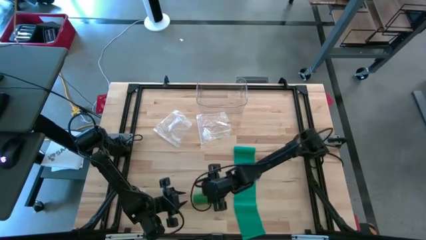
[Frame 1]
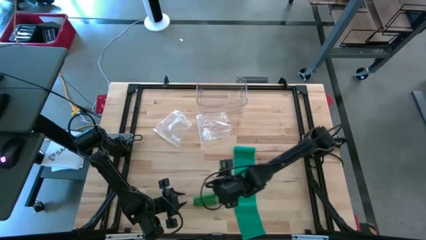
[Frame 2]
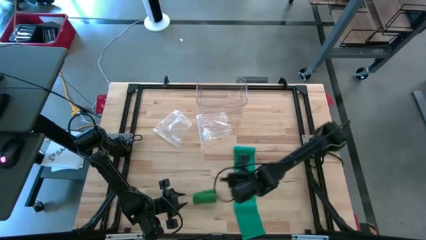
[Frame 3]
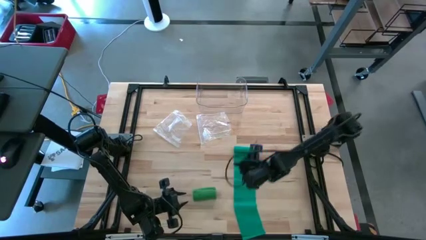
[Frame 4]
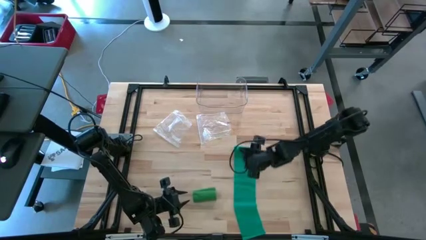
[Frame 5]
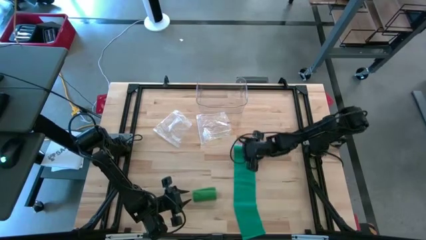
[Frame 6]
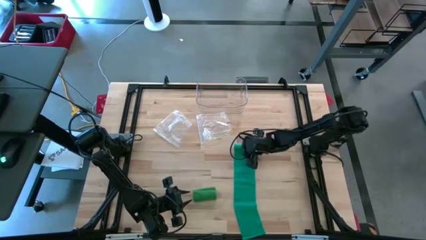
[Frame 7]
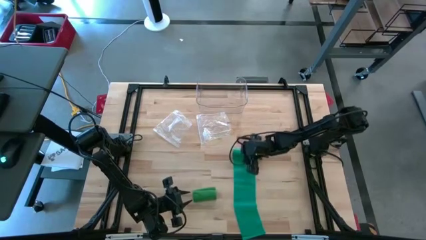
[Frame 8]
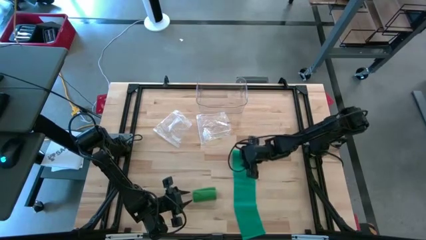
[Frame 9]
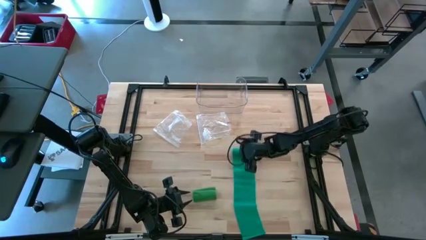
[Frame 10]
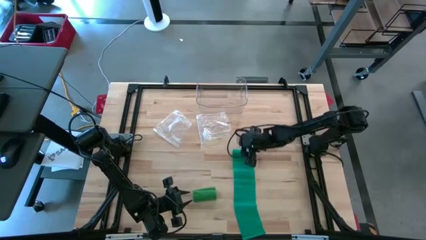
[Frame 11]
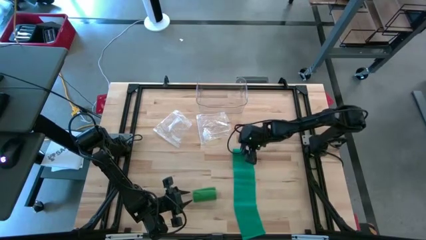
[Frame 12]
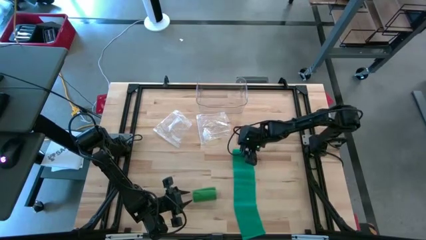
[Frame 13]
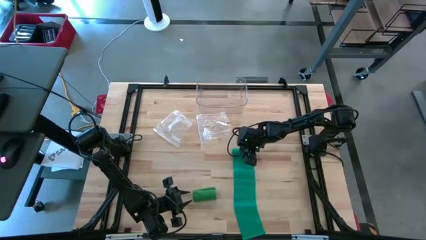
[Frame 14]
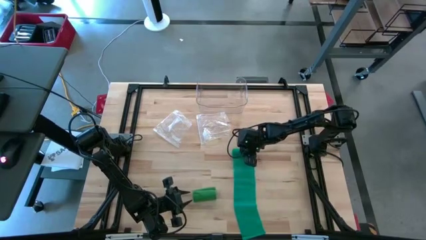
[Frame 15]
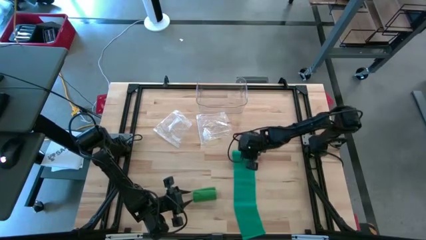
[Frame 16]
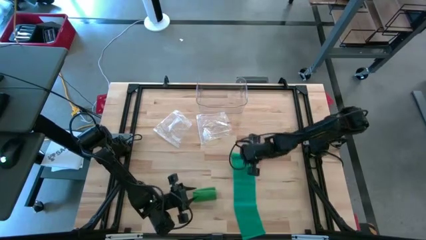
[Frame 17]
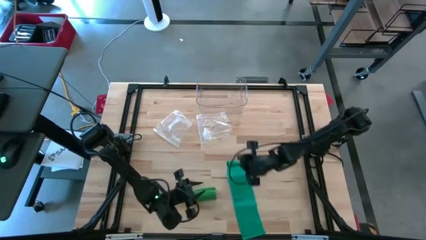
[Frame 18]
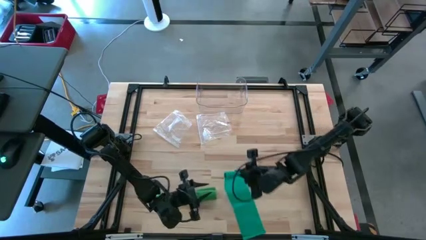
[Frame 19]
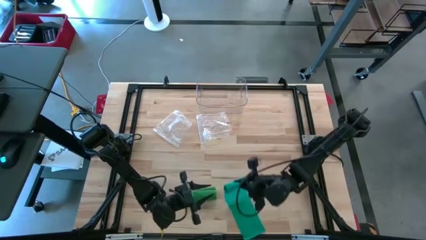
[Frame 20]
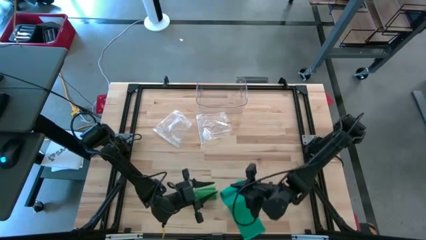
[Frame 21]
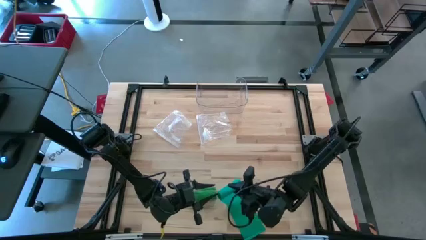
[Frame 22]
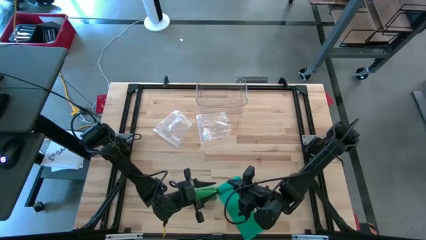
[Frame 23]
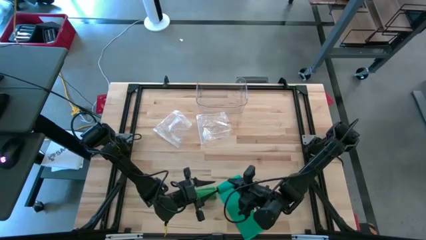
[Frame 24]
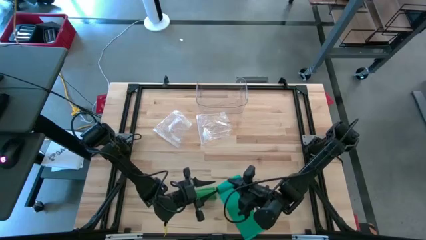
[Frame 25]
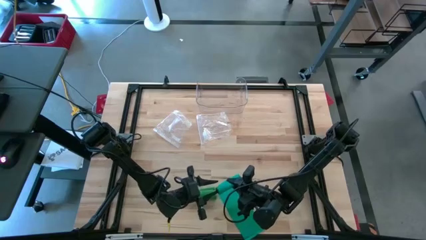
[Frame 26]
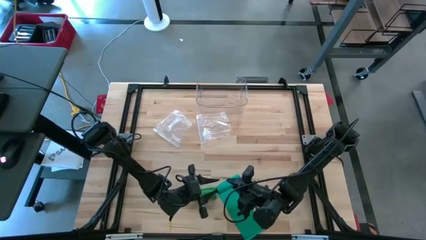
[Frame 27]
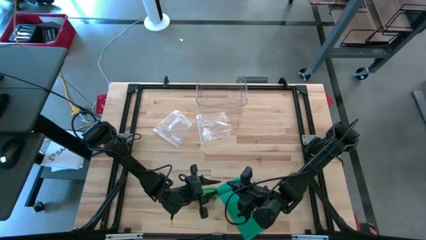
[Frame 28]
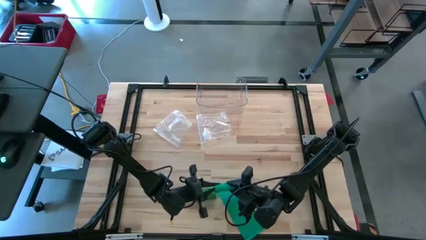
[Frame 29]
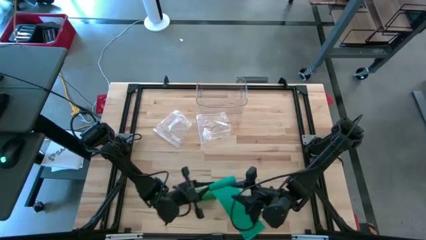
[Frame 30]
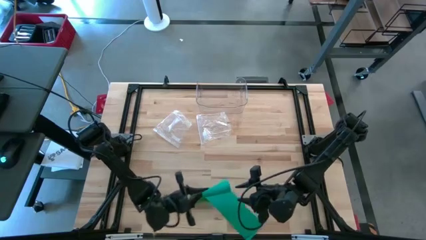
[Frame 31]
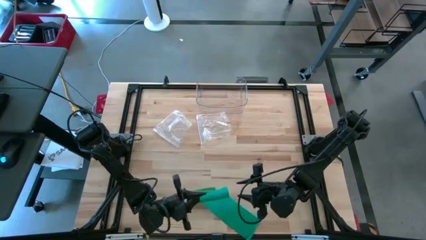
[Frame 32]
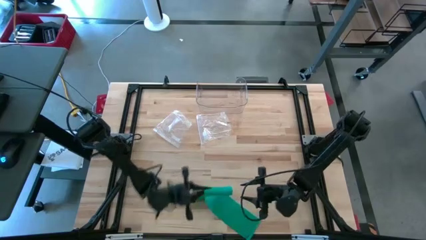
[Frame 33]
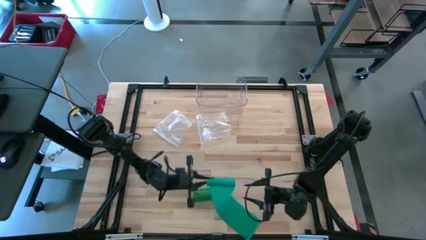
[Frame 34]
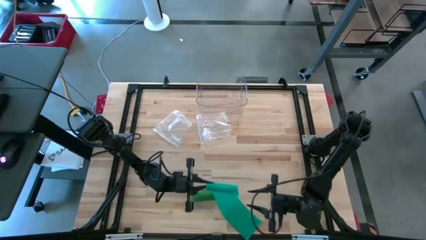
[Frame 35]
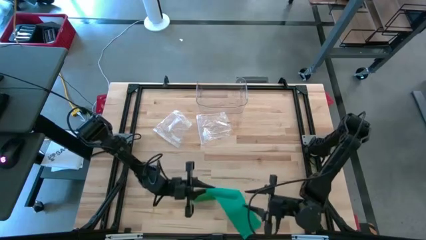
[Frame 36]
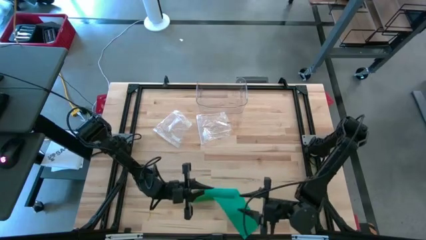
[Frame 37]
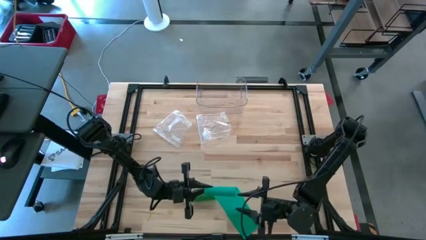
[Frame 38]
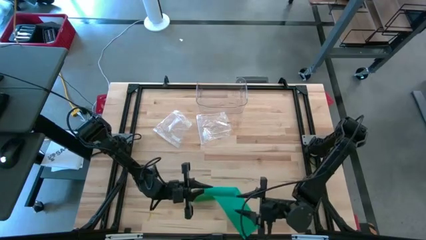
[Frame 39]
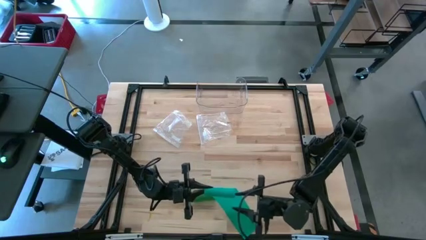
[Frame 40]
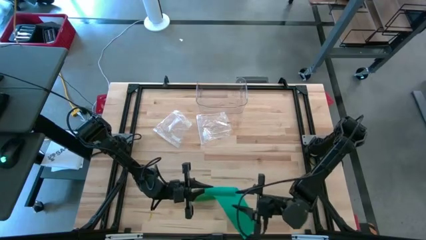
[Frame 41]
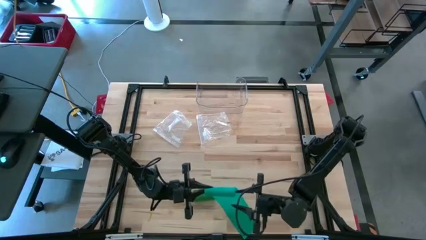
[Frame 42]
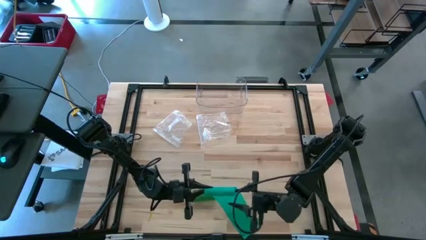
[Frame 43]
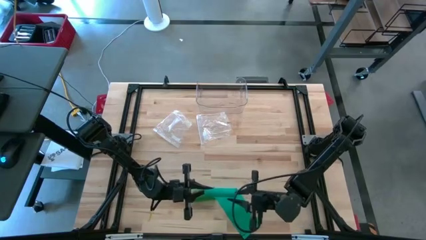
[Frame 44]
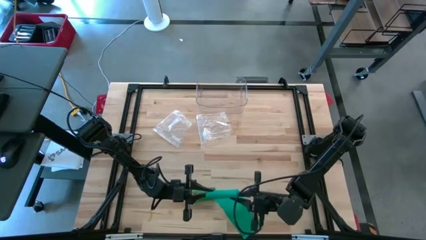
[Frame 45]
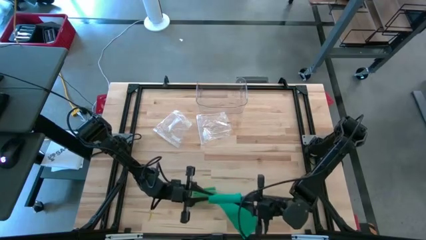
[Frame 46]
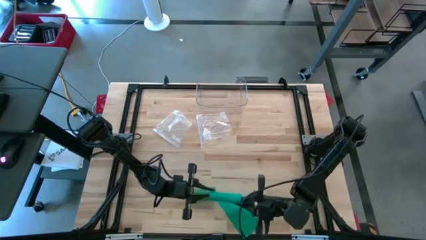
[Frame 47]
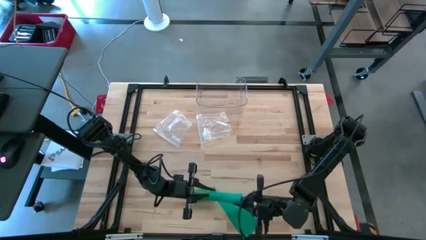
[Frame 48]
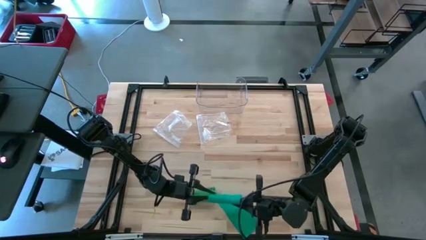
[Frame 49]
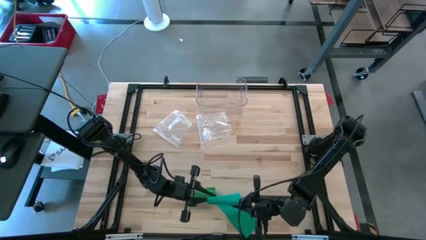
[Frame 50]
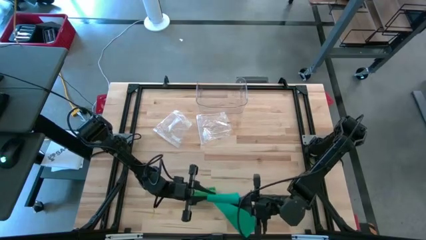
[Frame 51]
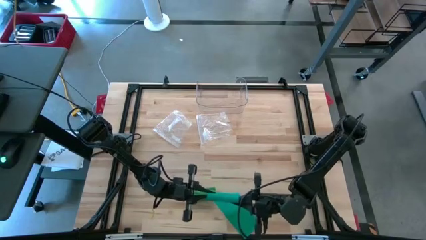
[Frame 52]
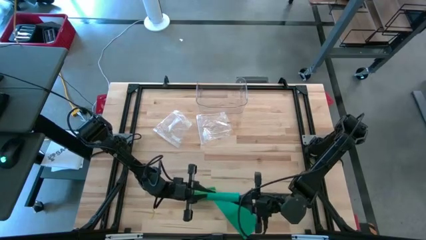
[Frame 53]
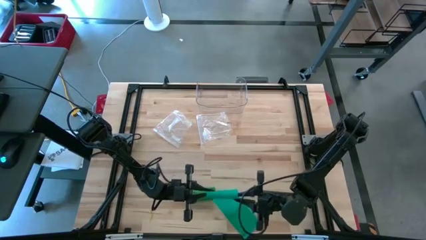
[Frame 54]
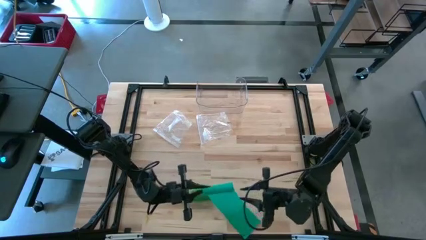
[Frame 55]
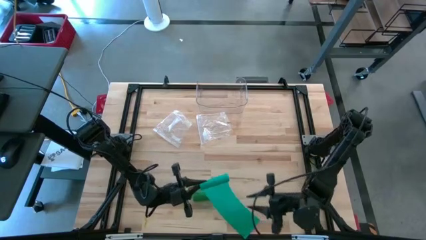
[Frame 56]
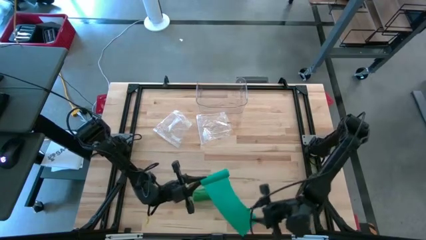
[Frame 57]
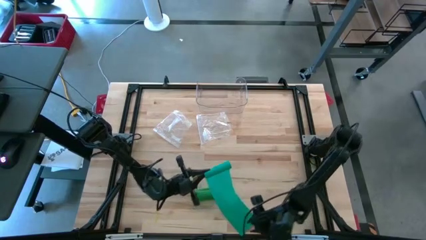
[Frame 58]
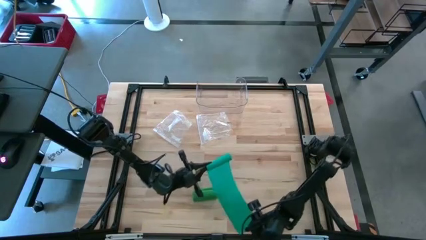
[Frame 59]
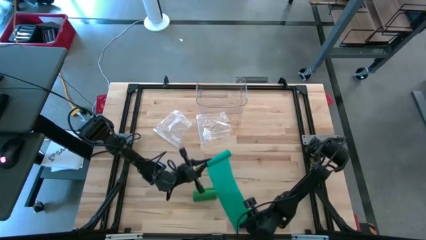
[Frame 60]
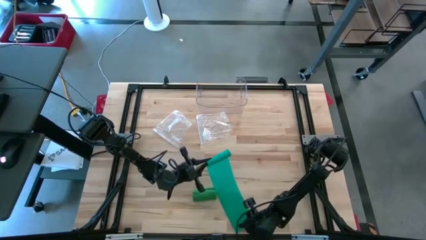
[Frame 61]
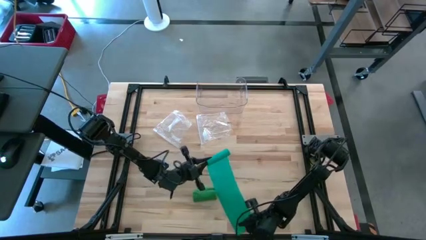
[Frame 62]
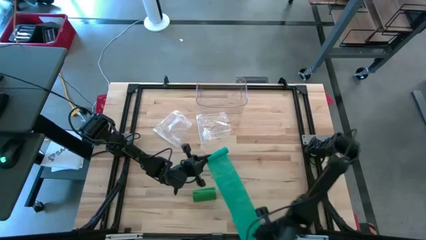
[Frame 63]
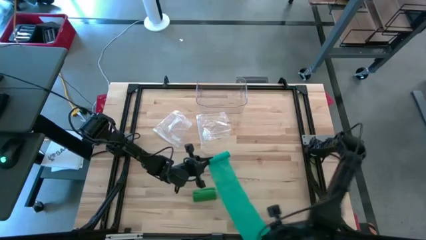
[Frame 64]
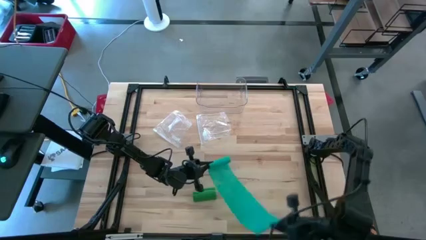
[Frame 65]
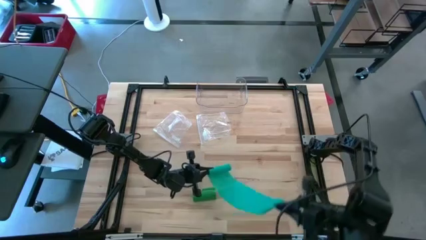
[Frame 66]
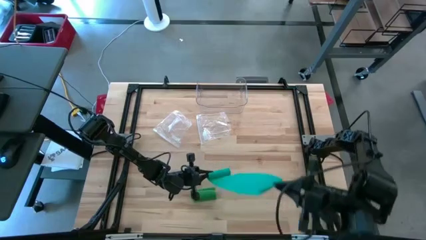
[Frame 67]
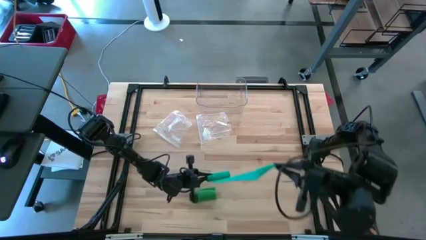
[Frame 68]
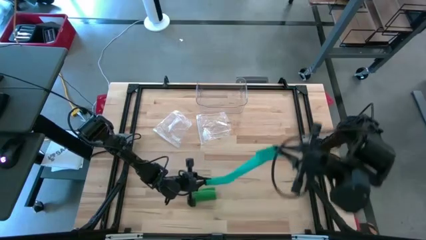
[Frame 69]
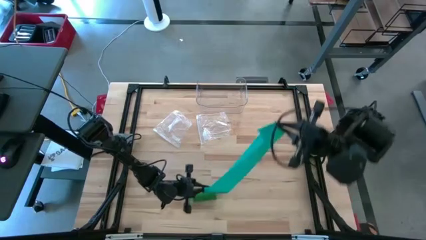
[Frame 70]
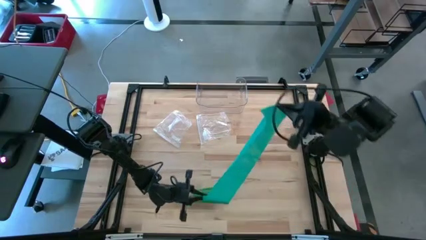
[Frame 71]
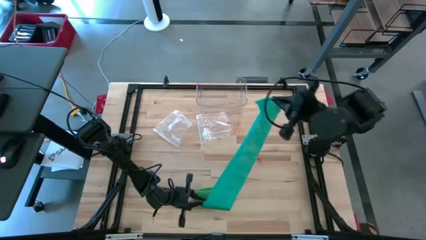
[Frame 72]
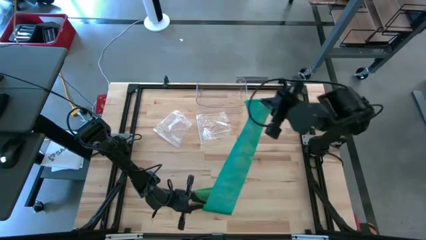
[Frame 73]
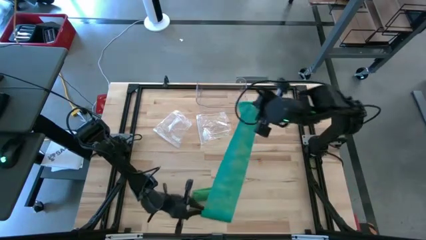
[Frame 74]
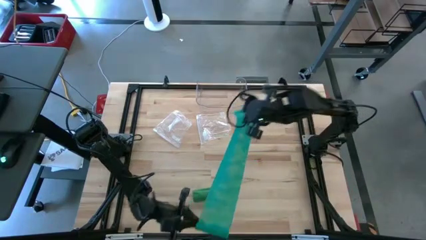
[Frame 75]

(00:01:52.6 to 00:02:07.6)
Task: Roll bandage
Roll the blue bandage
